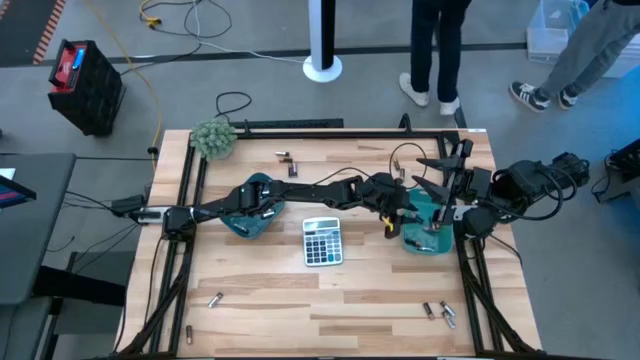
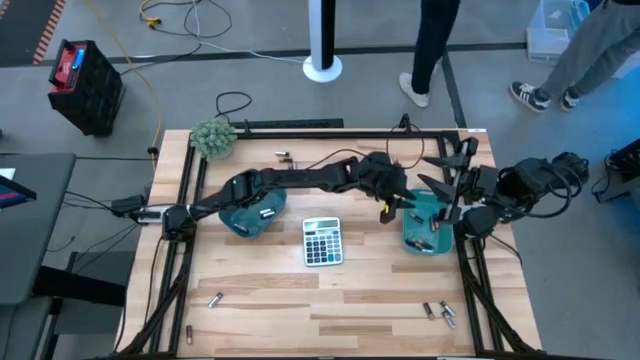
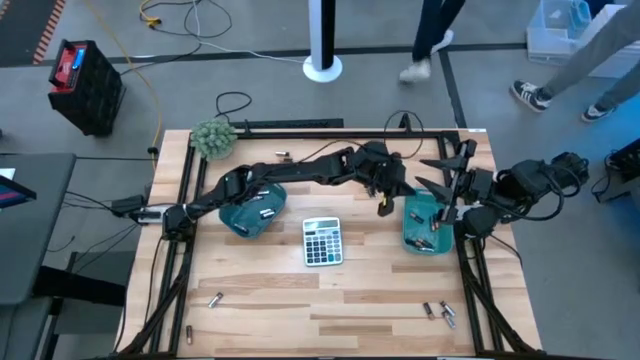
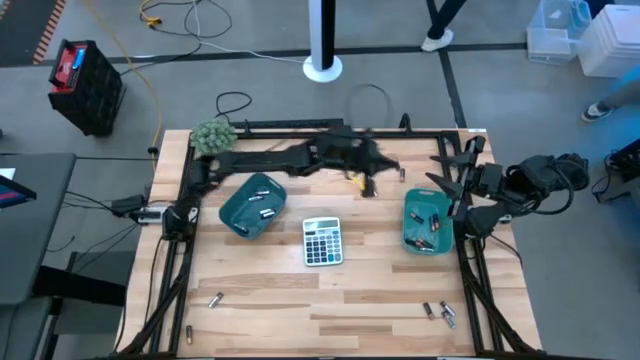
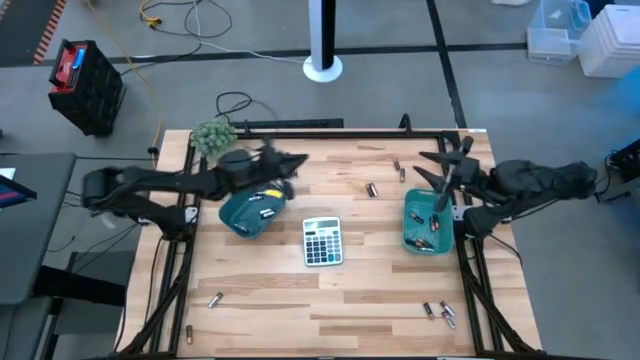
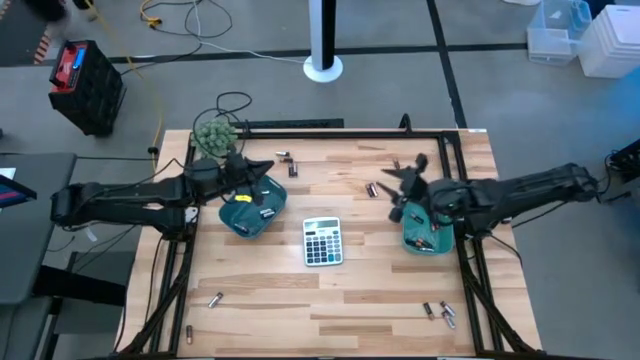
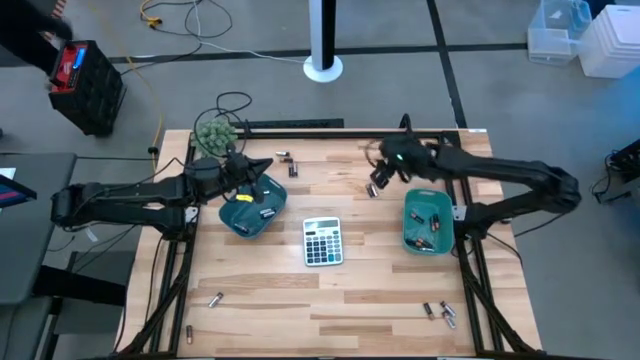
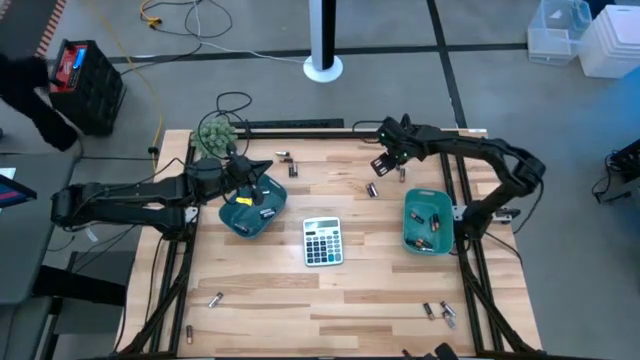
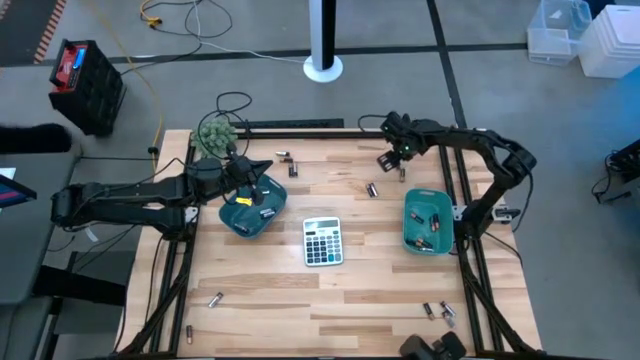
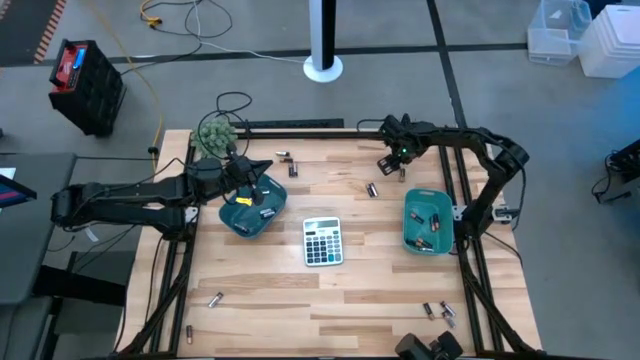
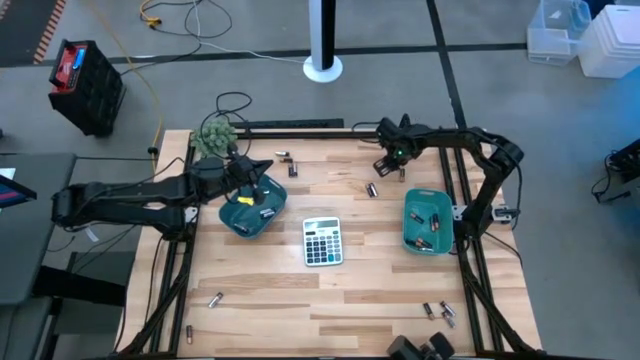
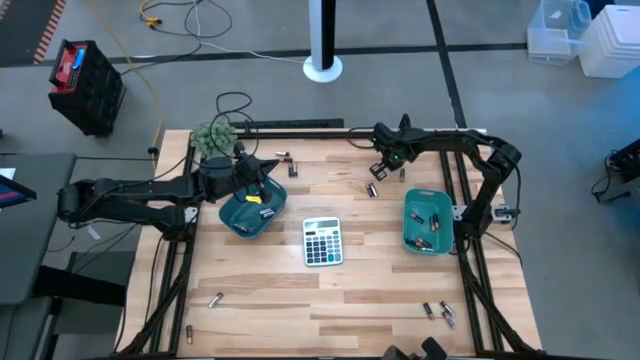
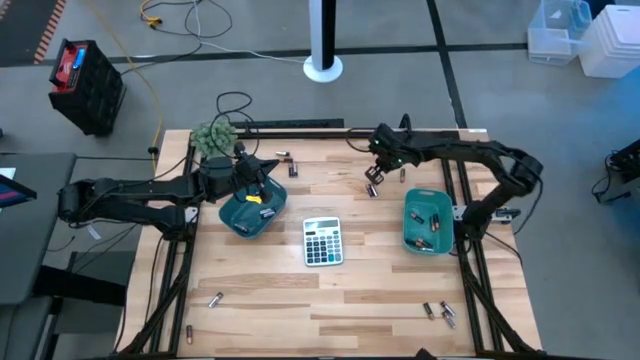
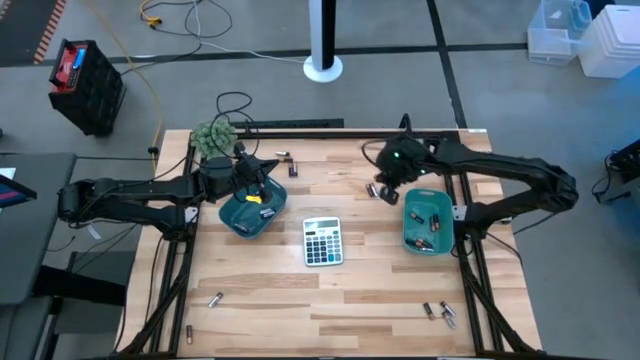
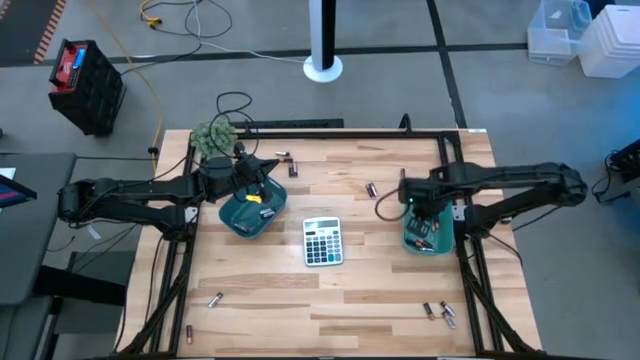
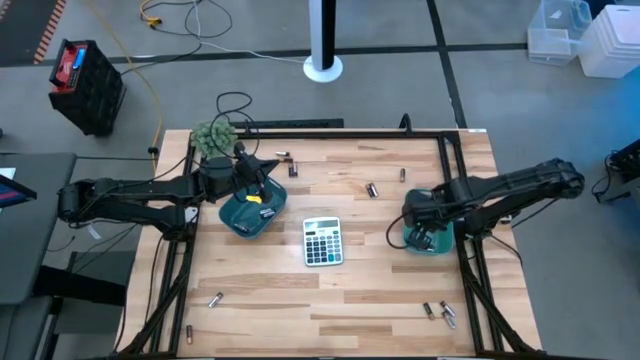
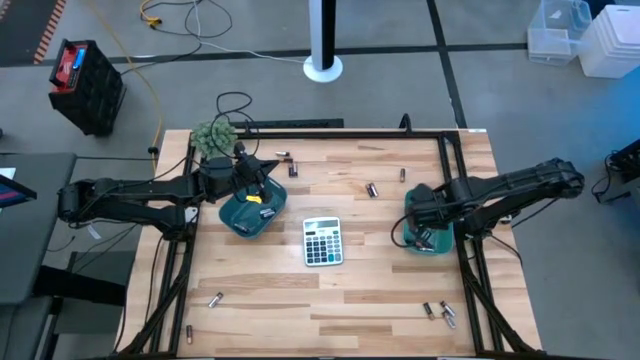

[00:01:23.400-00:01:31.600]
Task: Sort batteries
Put the brown/black battery into the green bin

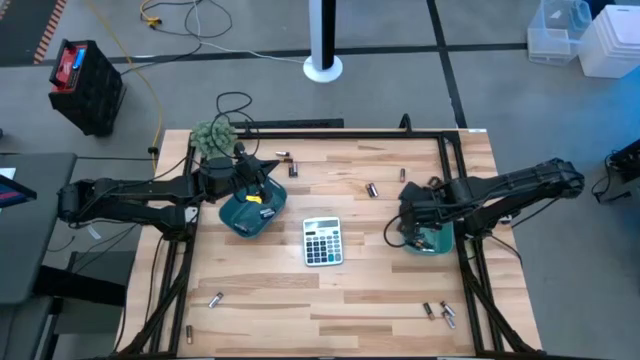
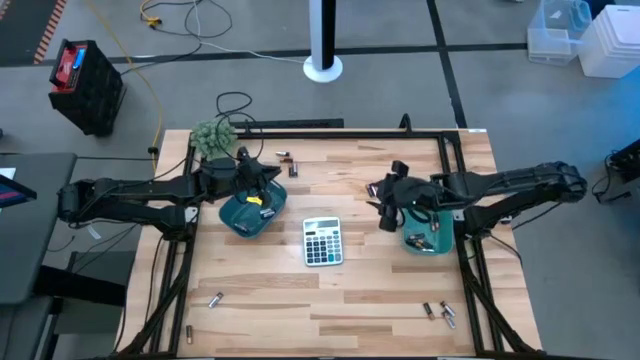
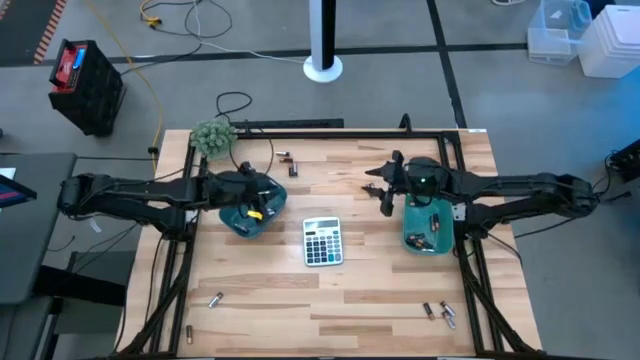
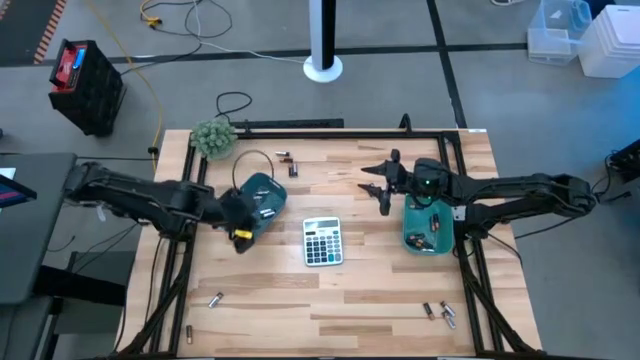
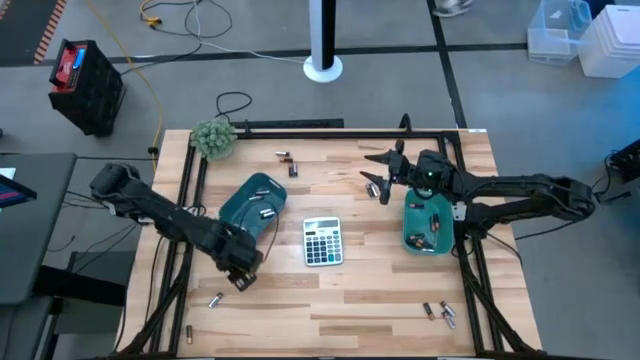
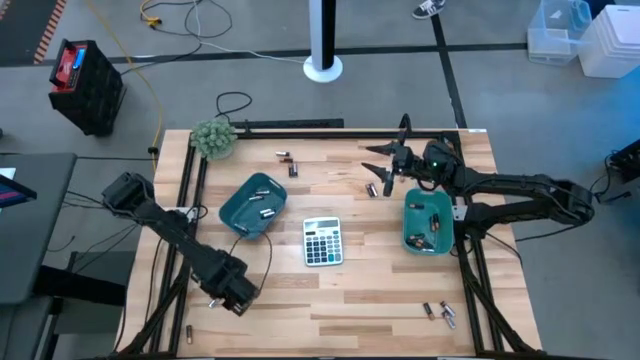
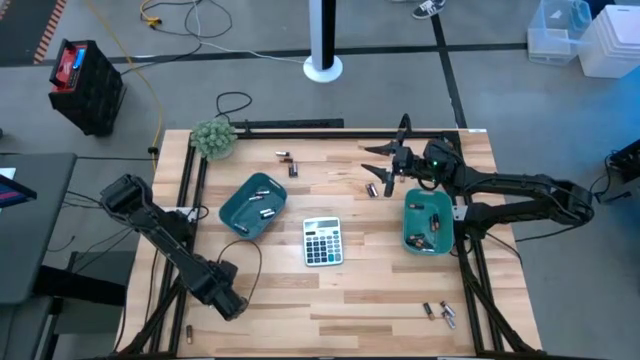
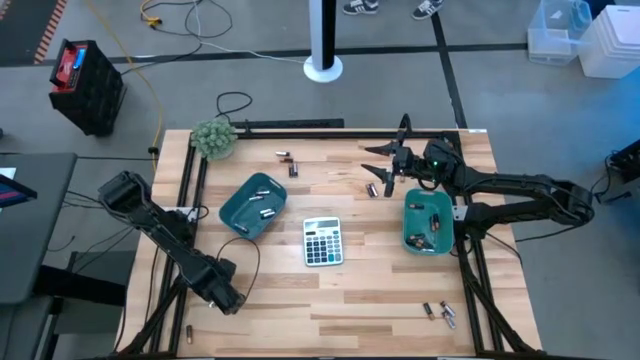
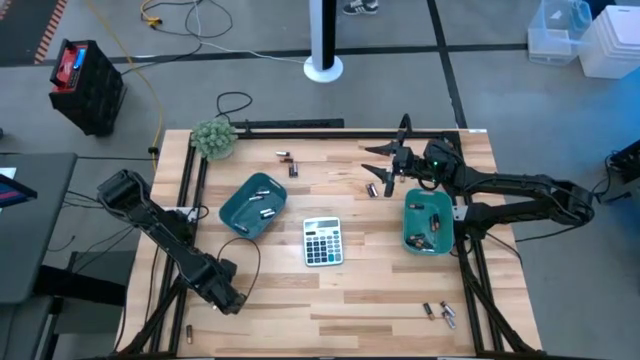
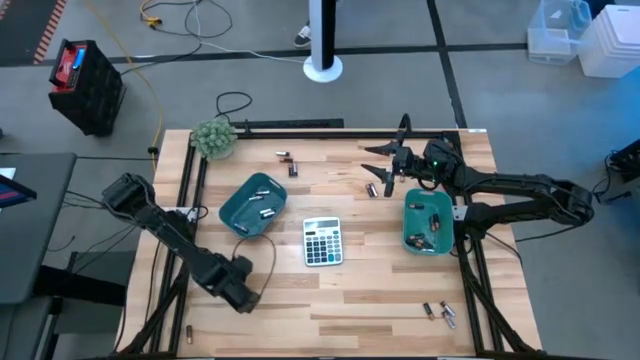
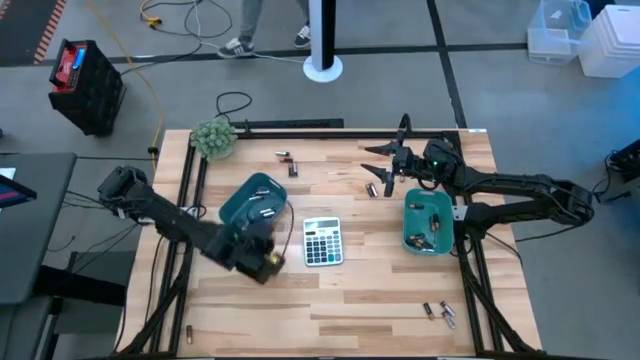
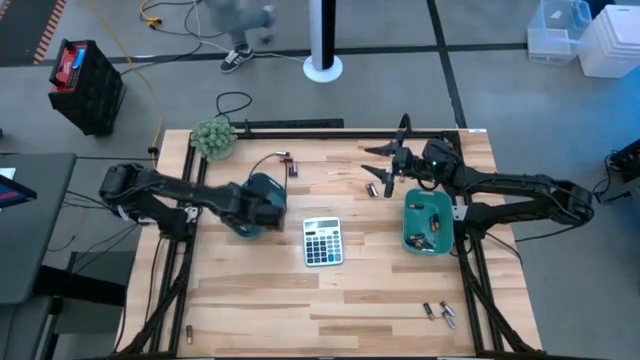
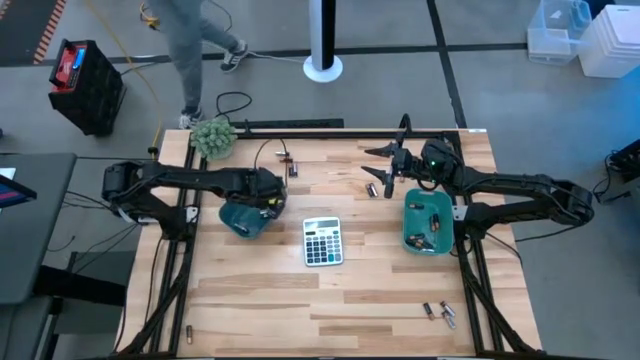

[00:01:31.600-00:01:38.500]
Put the silver/black battery into the blue bin

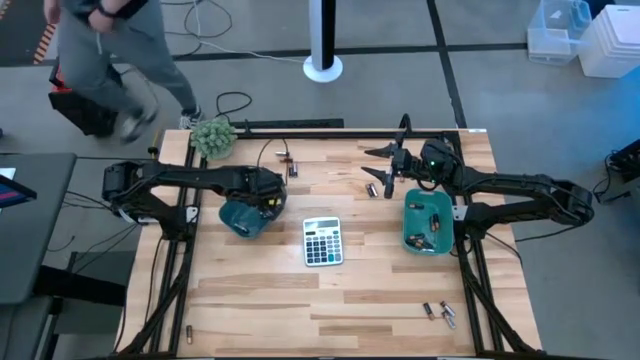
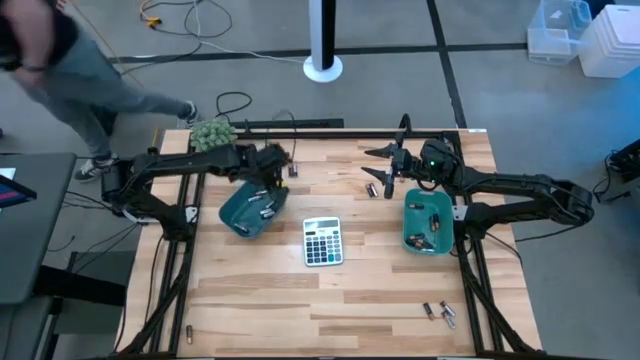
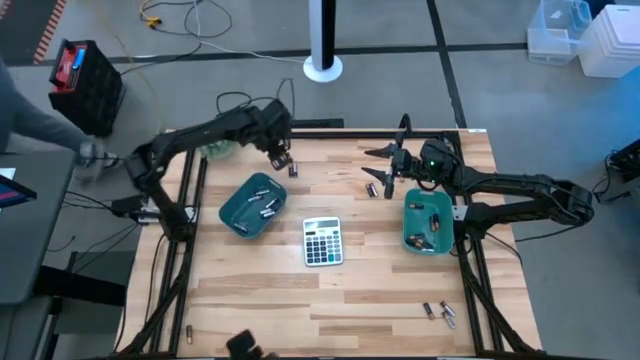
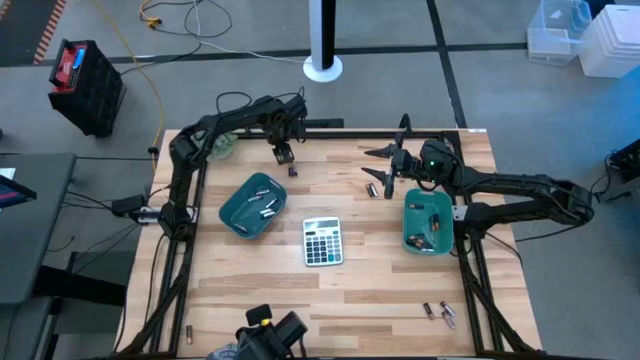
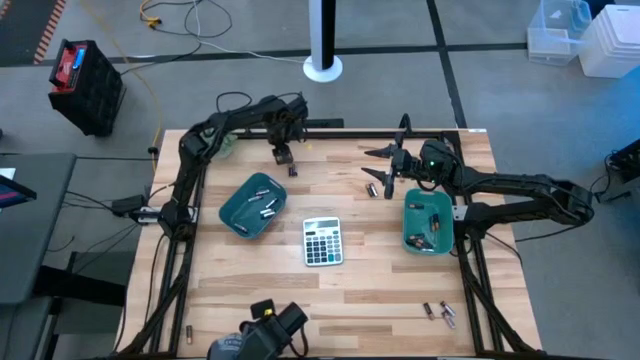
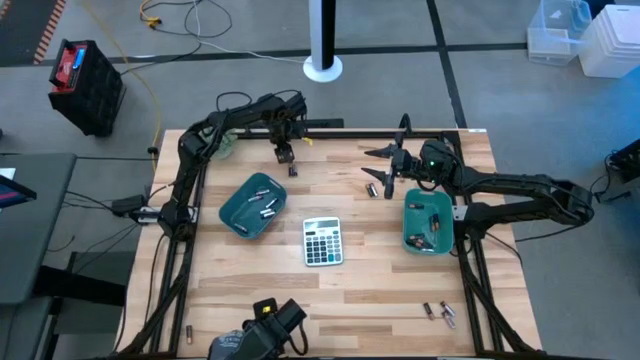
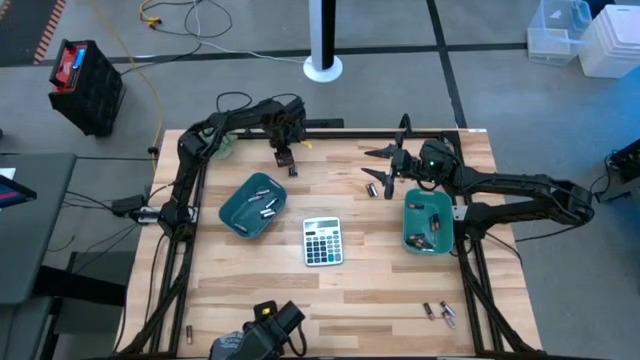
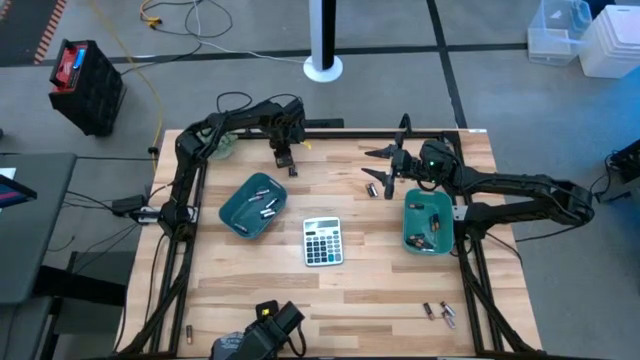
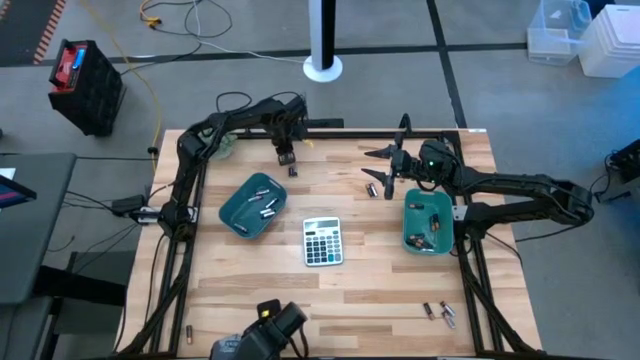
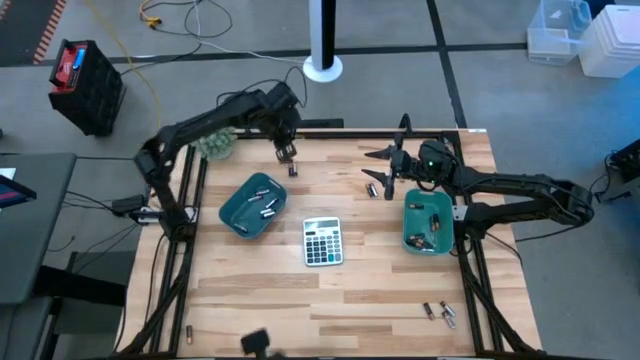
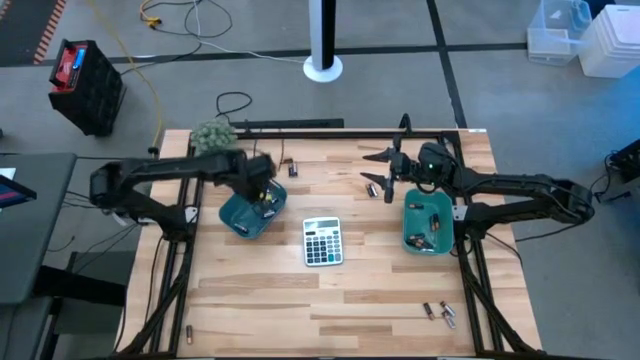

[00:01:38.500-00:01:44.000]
Put the silver/black battery into the blue bin

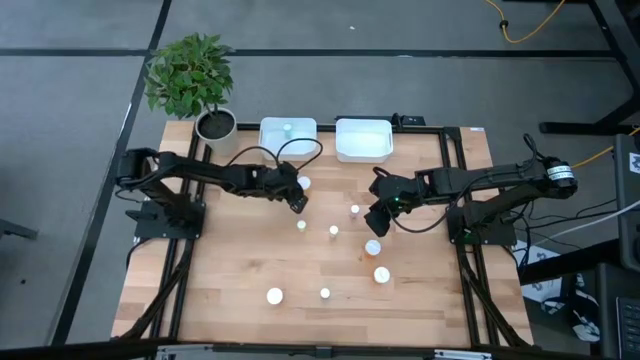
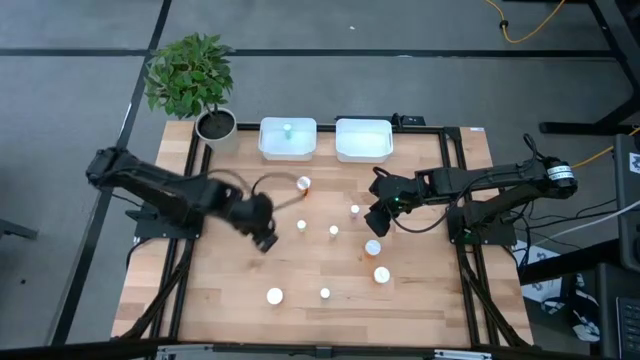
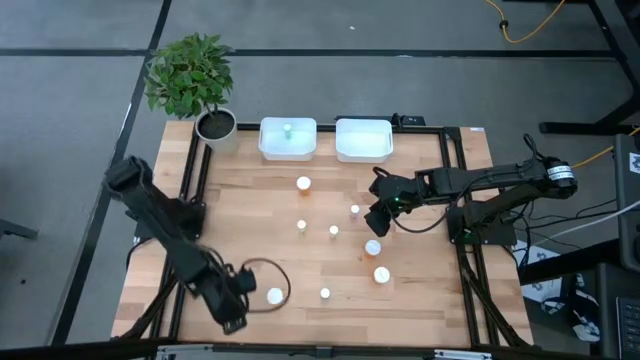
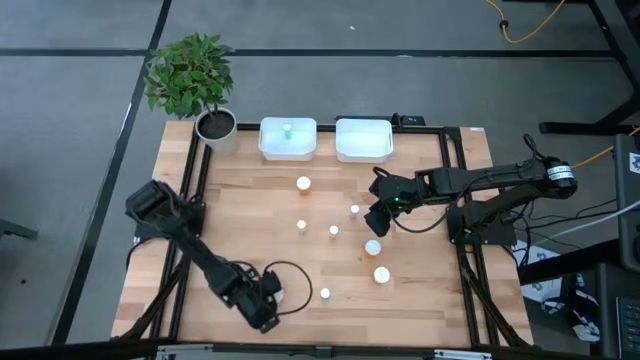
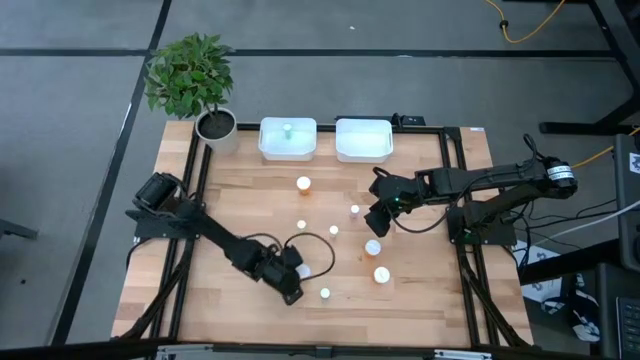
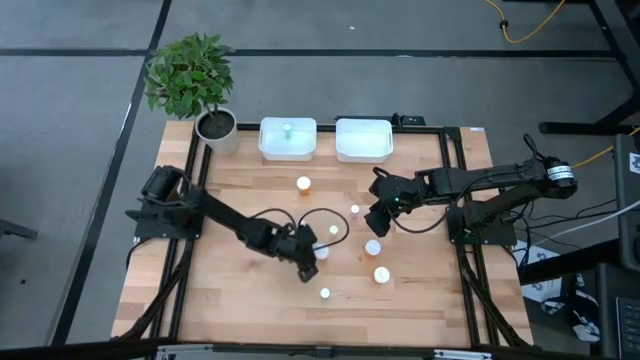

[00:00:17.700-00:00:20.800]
Task: Pick and place medicine bottles into bin by pill shape (circle, oval)
Move the orange capsule bottle to the center of the table
